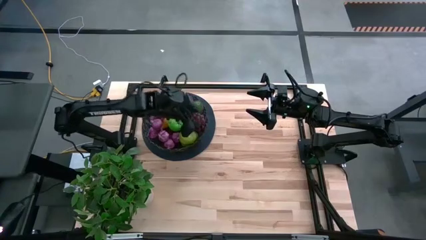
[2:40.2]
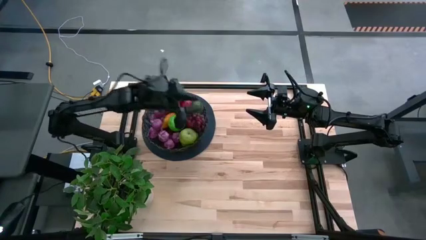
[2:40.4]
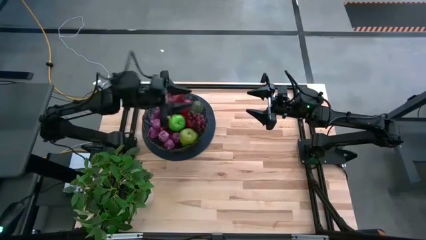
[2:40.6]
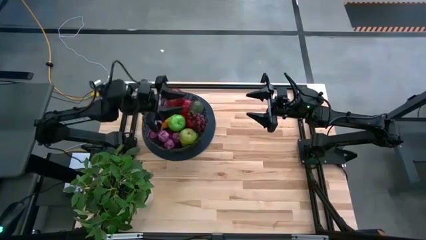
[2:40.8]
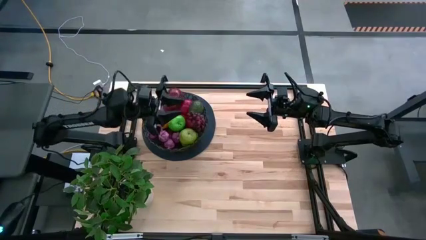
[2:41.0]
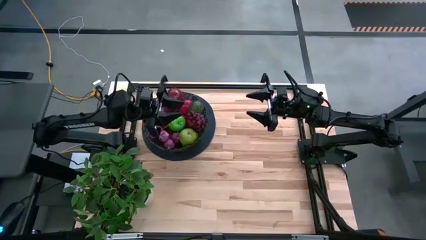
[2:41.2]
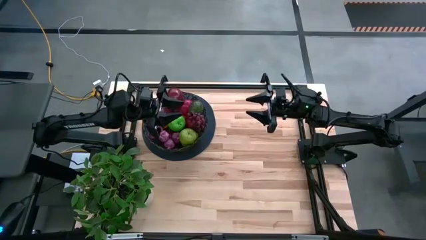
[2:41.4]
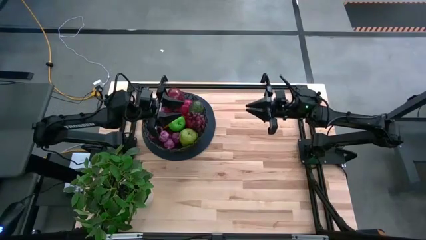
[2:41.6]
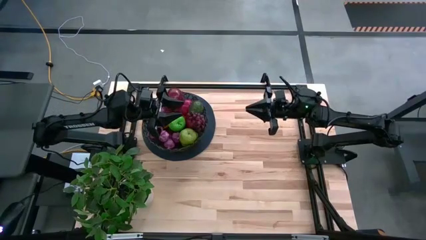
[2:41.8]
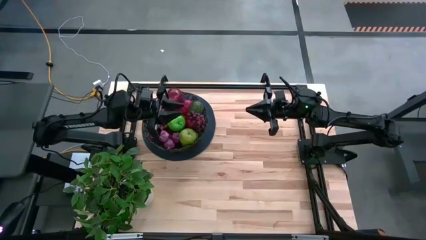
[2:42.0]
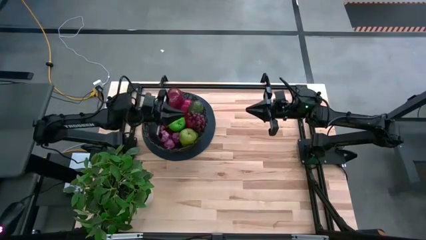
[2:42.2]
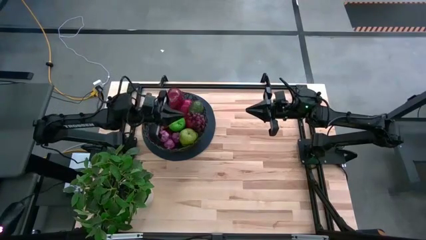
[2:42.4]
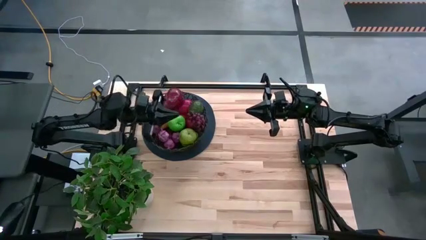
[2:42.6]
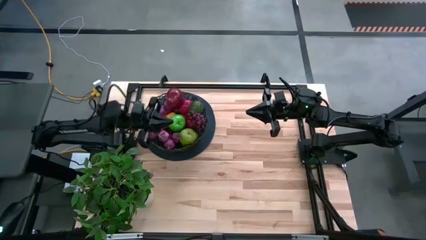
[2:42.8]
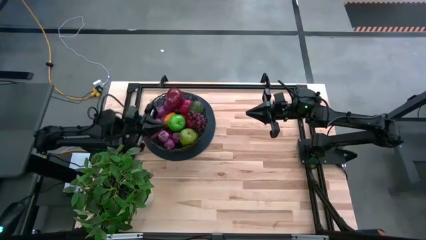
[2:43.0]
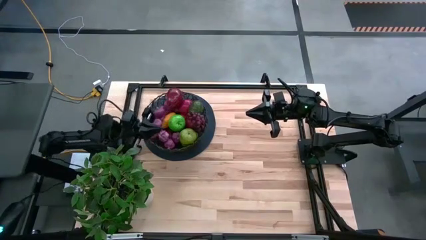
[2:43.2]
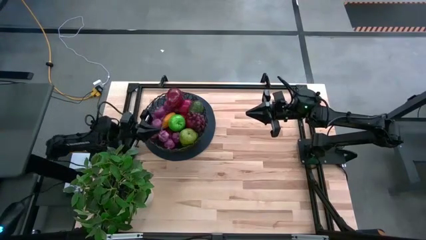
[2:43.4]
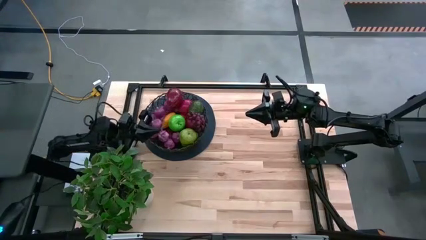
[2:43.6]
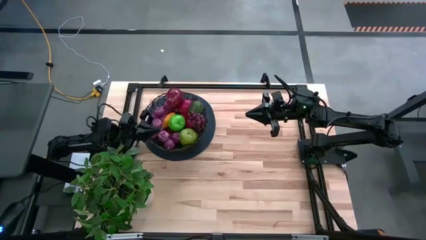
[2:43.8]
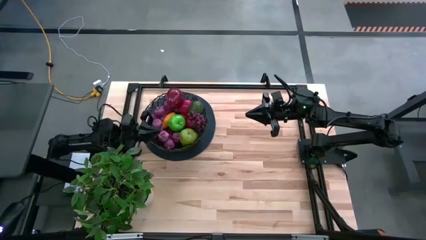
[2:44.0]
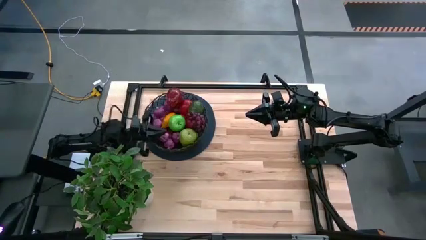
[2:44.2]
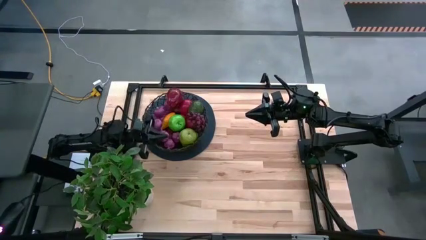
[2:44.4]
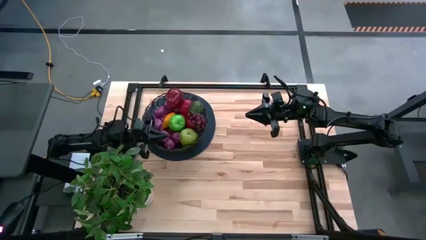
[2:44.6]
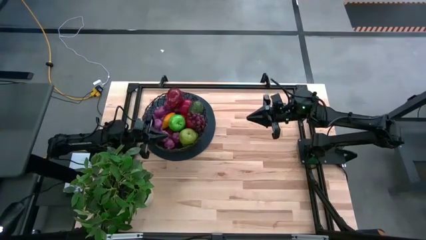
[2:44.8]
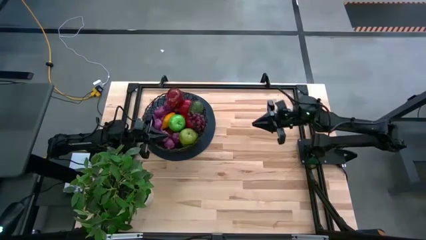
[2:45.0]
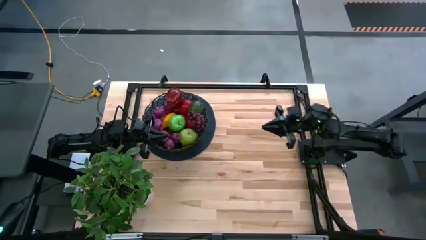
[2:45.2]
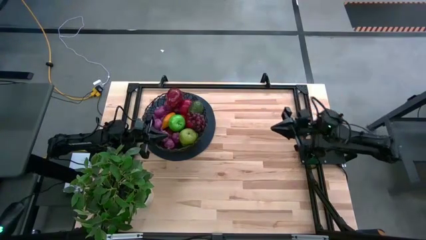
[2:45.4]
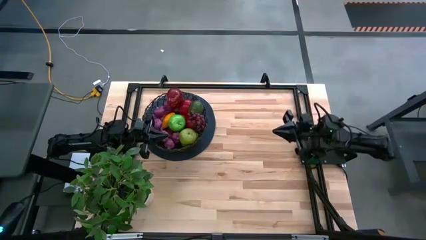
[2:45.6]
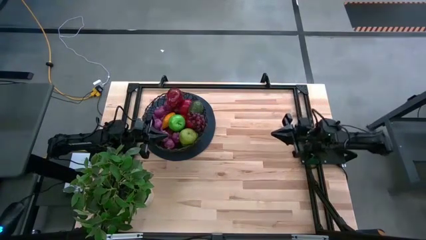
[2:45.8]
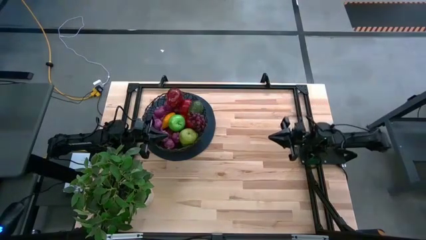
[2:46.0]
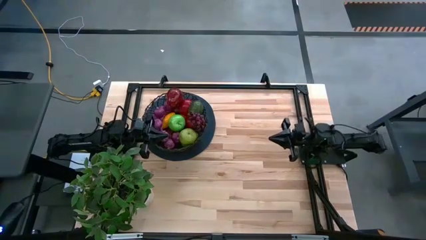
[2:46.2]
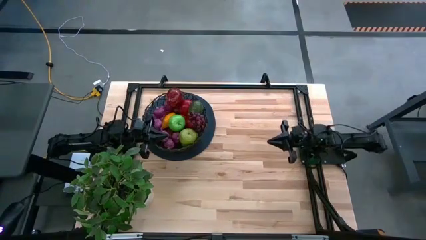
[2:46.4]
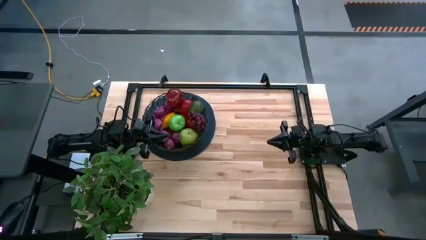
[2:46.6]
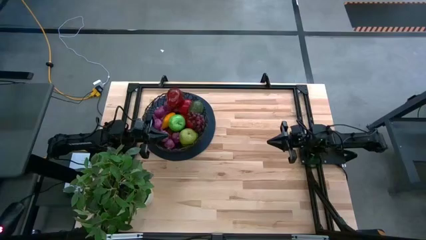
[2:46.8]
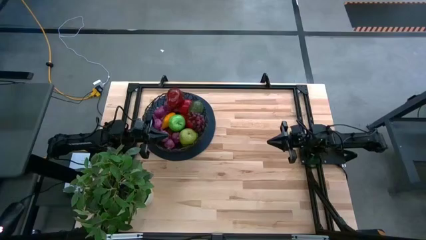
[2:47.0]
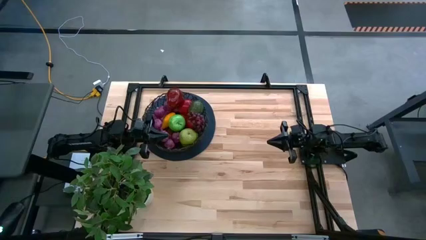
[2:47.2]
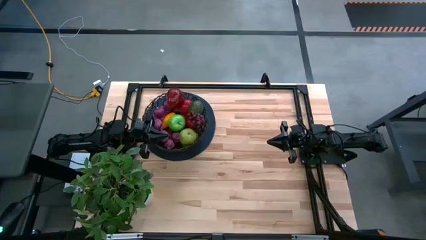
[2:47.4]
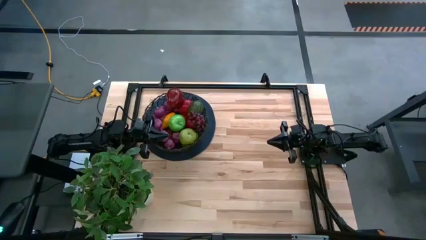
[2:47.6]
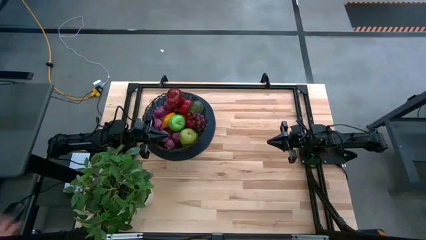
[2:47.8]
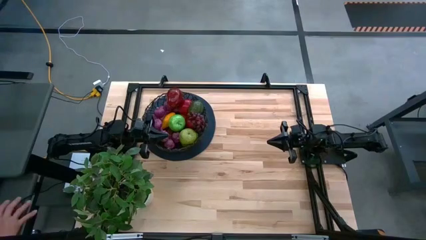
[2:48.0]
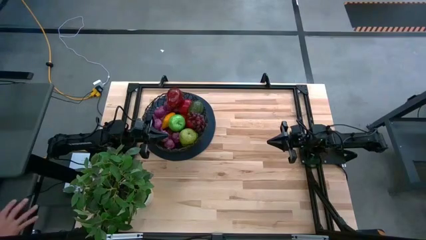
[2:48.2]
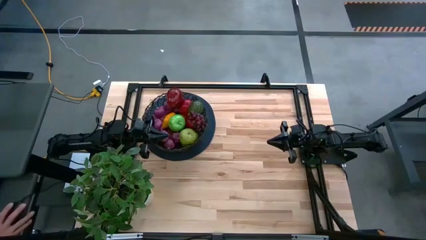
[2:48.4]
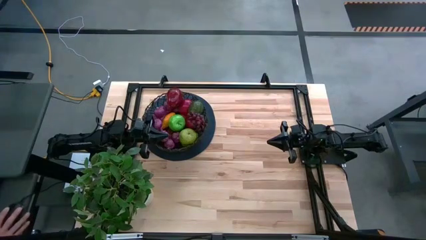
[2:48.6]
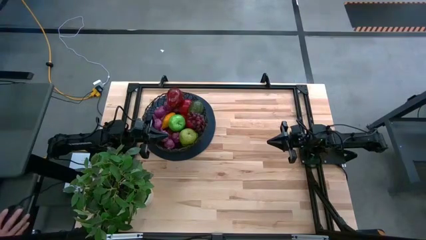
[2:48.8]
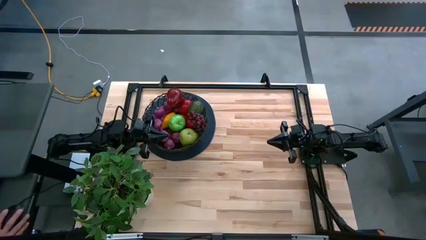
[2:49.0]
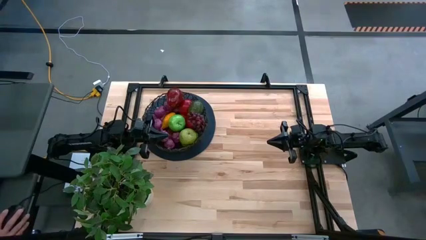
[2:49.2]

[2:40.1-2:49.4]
Task: Build produce basket
Return to Home Position

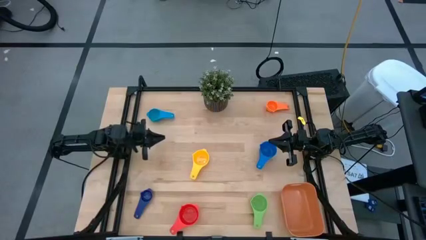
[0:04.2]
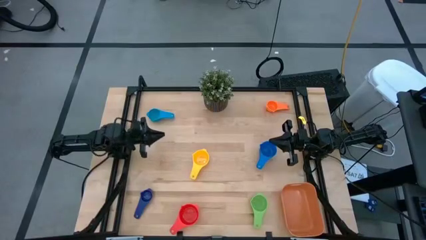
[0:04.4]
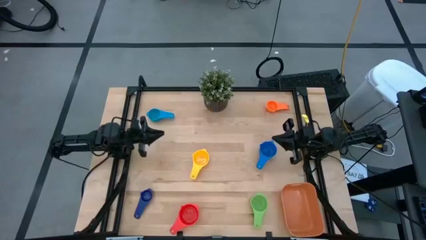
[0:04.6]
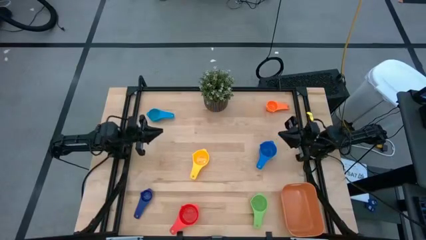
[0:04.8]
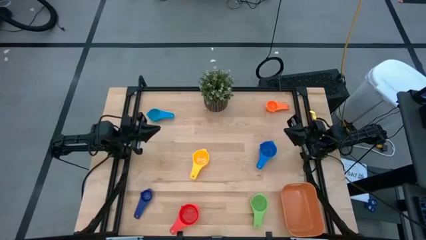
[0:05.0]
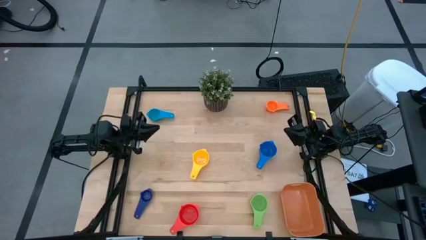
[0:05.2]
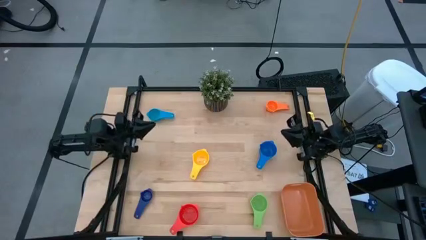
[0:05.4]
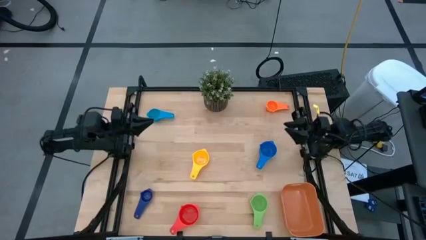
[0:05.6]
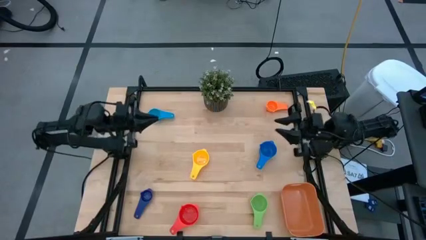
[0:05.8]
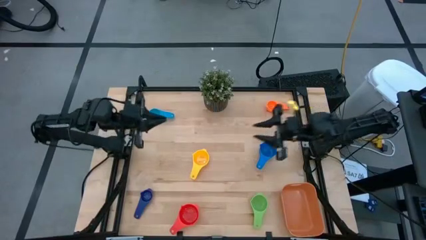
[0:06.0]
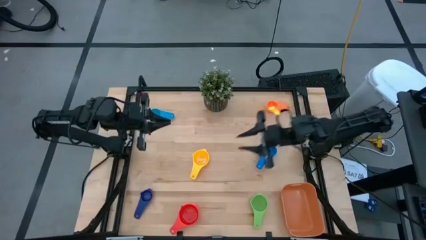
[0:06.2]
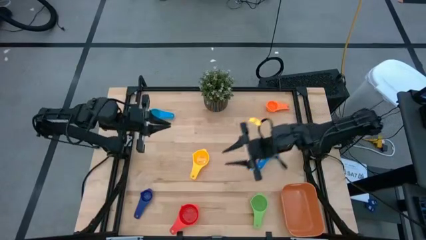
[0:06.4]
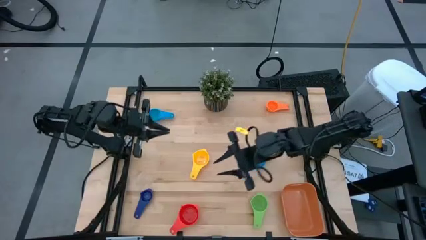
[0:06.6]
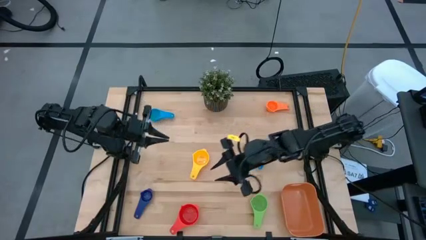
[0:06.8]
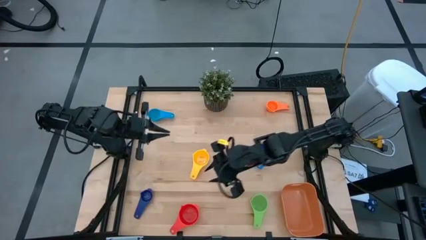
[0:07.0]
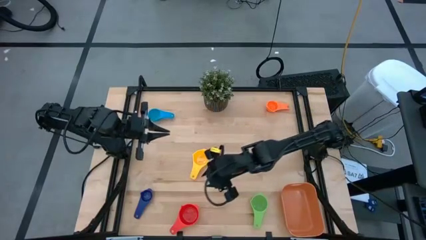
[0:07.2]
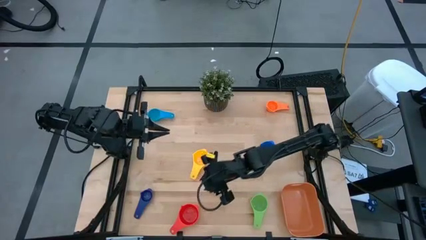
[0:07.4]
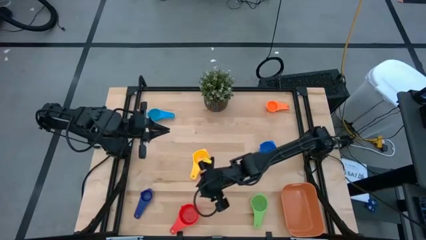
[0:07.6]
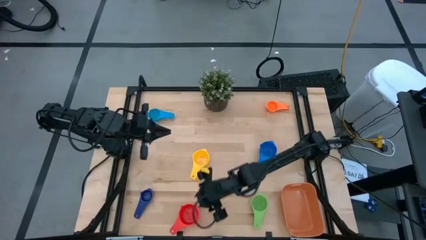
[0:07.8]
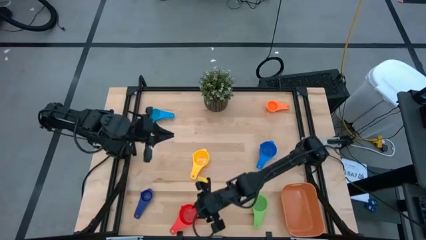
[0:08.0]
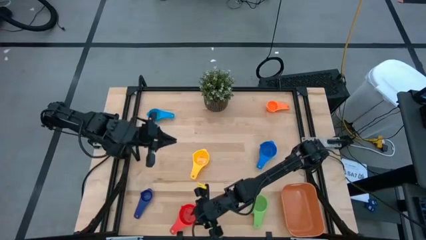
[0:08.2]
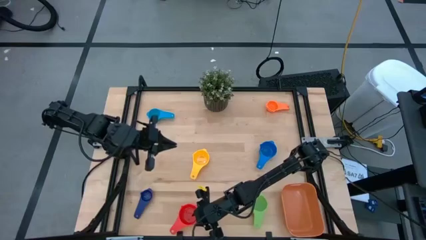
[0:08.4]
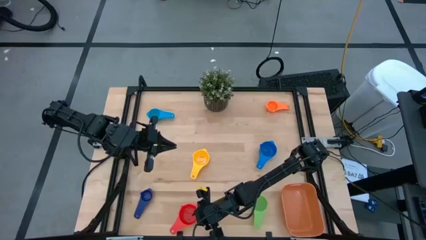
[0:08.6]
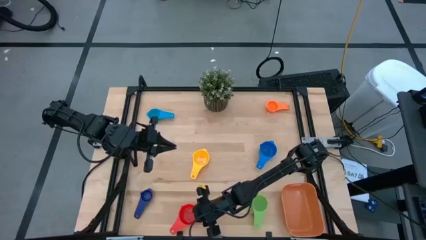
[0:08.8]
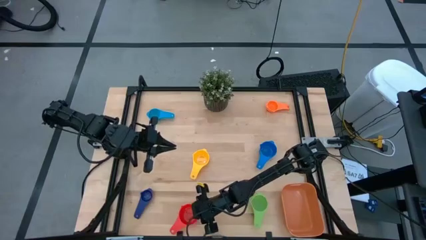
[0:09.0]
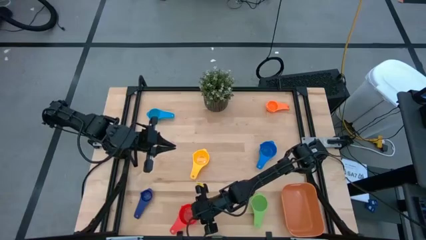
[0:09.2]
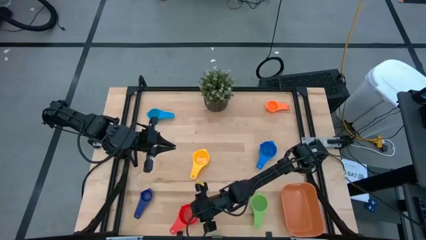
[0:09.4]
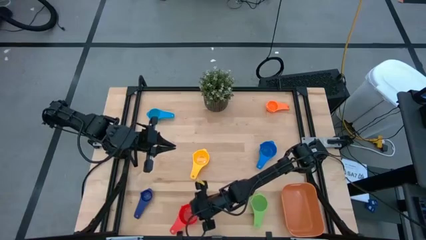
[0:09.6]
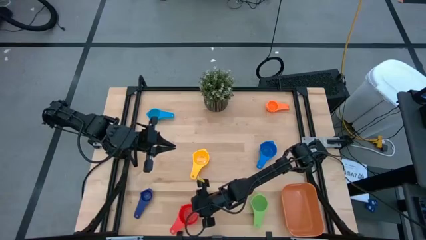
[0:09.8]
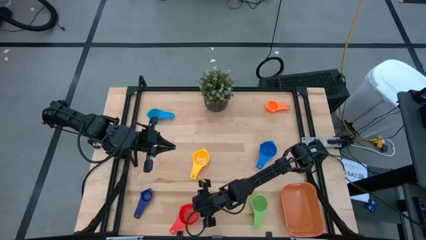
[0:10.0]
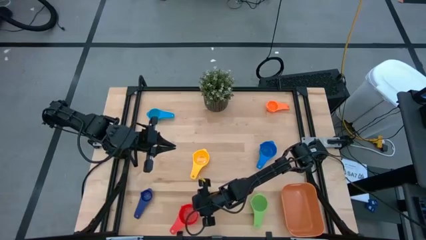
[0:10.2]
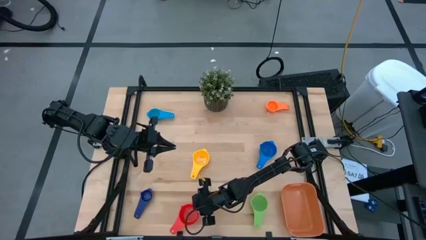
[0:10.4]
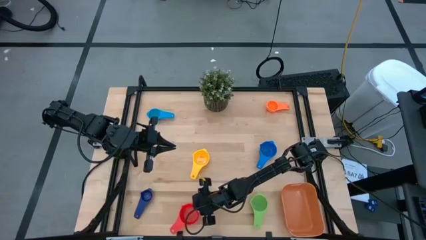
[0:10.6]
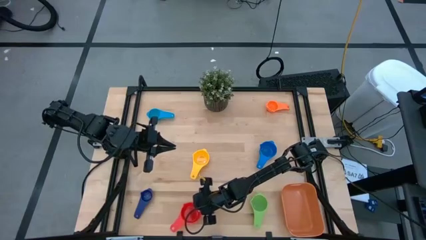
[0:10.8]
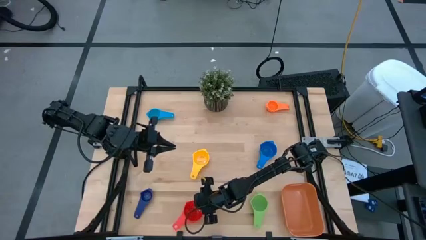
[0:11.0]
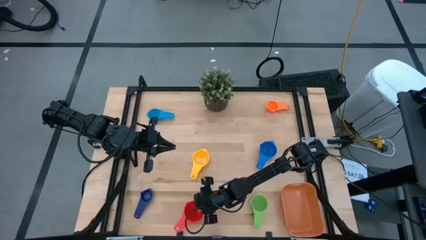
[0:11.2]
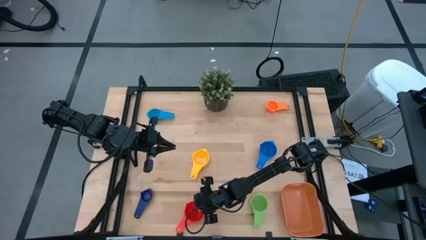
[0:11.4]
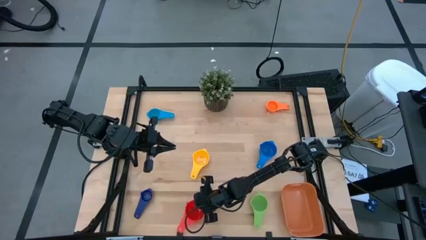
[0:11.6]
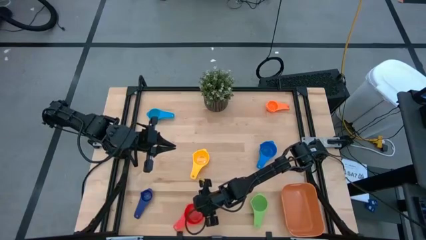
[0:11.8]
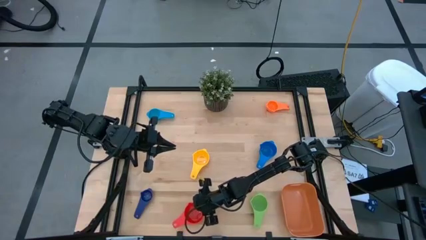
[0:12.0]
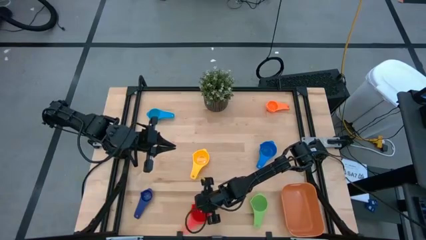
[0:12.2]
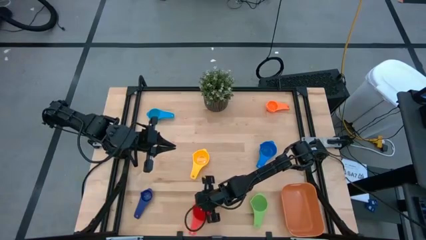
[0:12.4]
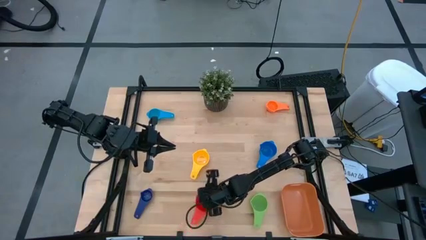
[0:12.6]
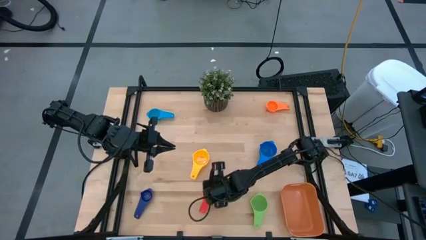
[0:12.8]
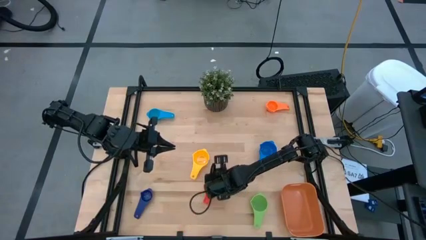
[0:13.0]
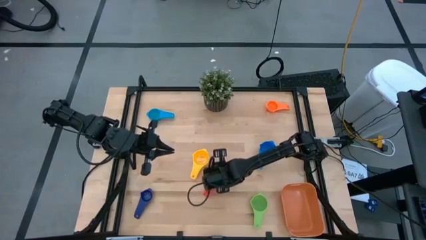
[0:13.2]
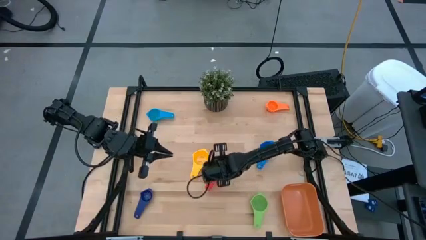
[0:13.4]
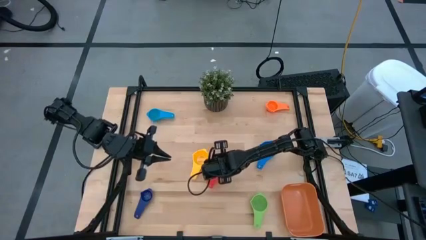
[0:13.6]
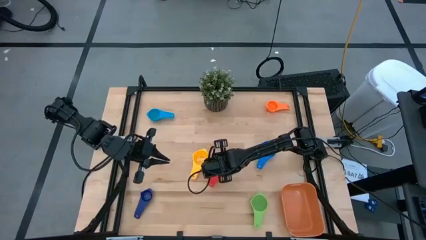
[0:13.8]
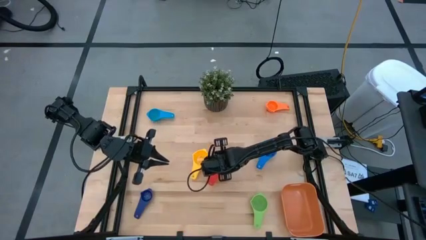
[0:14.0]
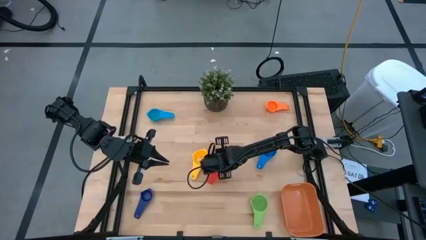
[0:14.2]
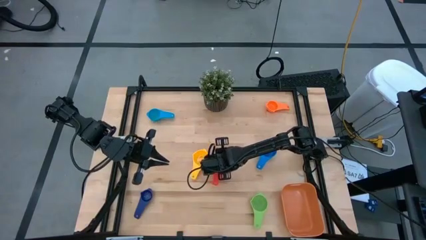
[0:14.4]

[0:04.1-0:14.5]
Task: Nest measuring cups in basket
Move the red measuring cup to the center of the table
